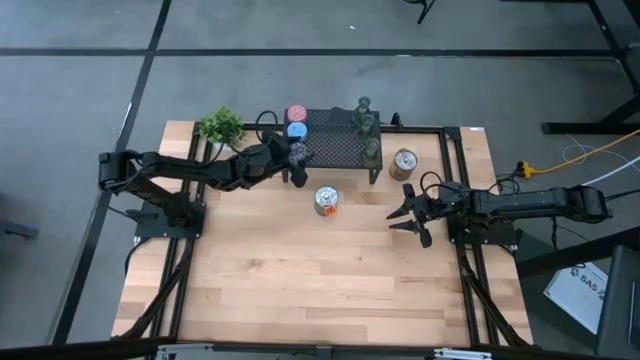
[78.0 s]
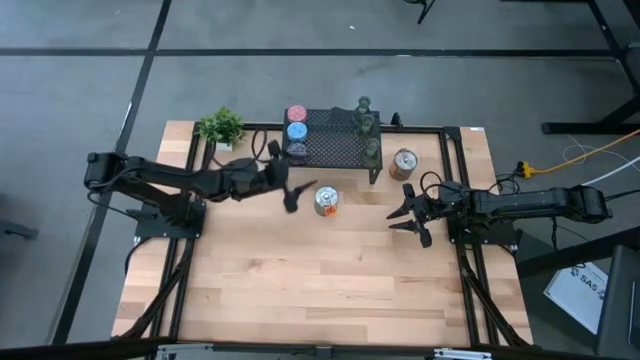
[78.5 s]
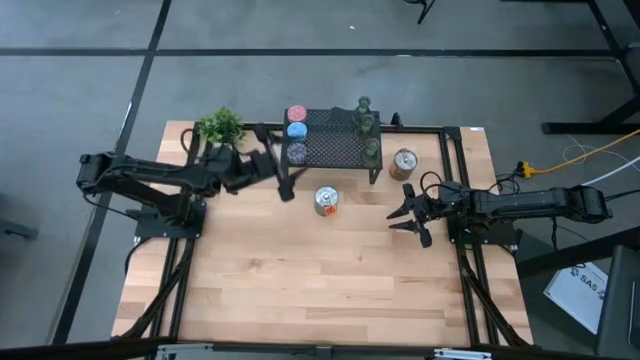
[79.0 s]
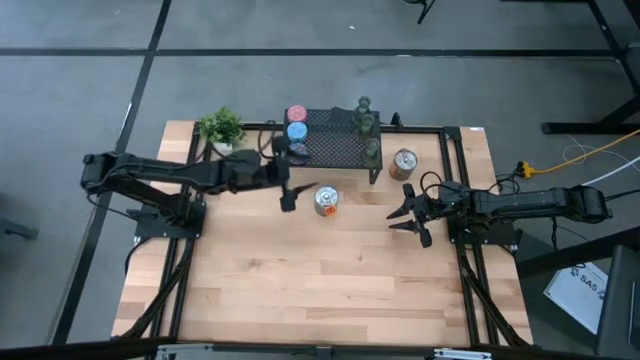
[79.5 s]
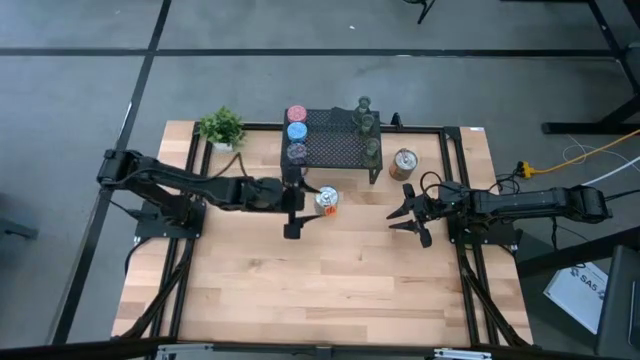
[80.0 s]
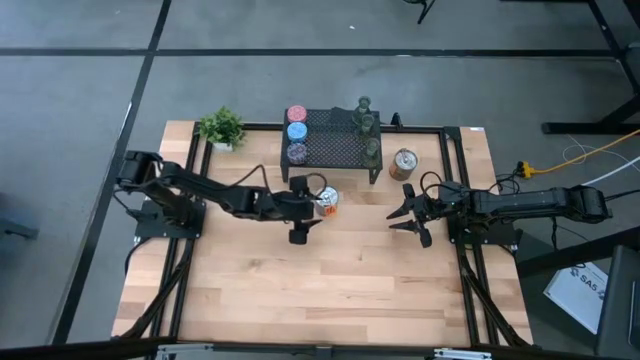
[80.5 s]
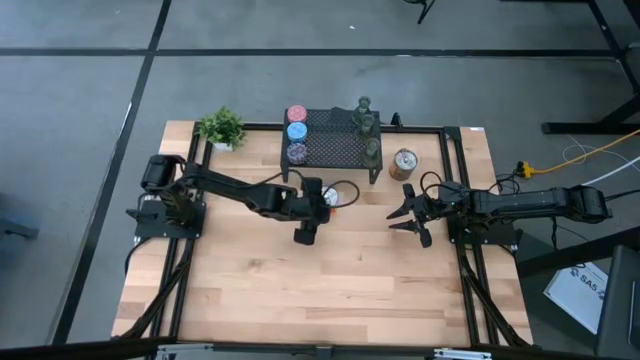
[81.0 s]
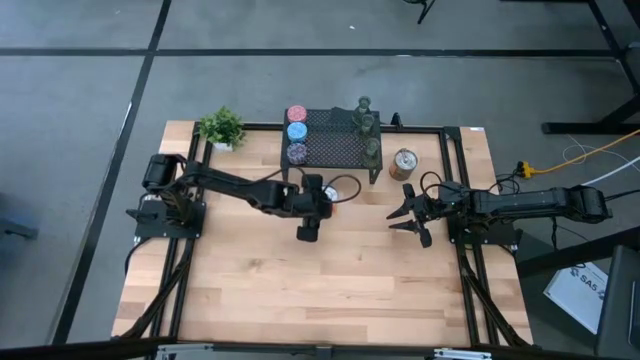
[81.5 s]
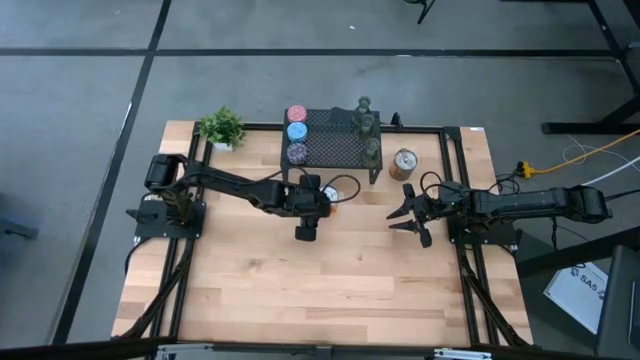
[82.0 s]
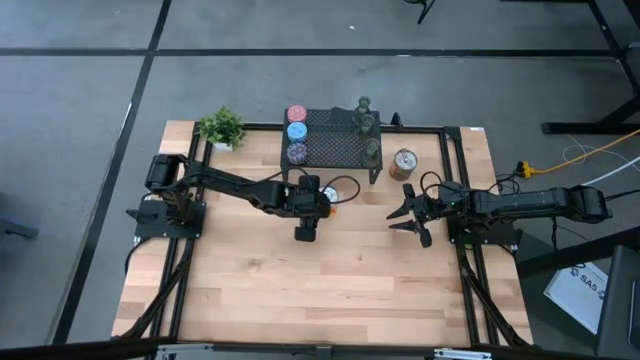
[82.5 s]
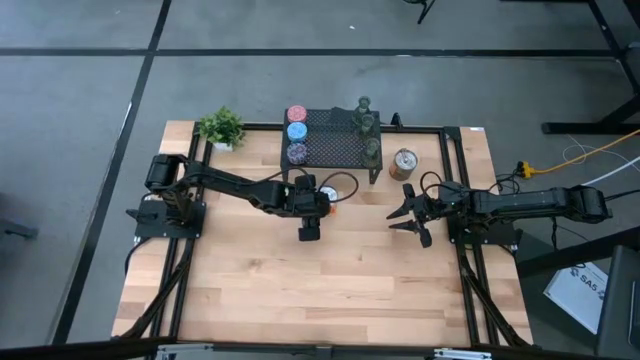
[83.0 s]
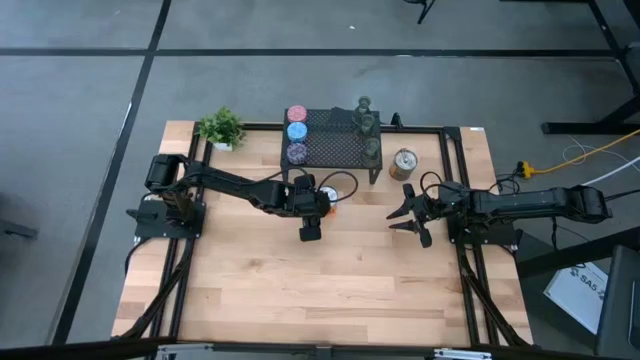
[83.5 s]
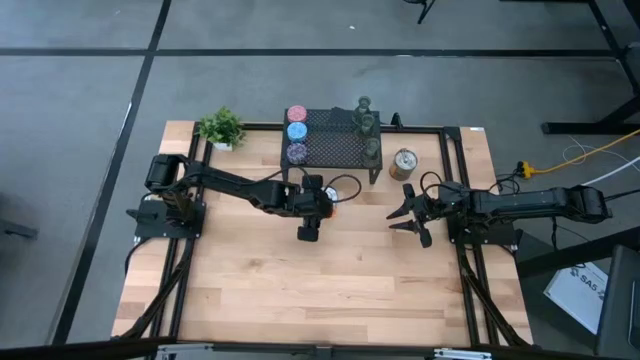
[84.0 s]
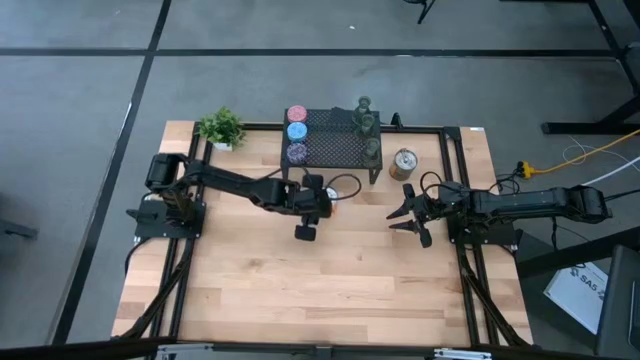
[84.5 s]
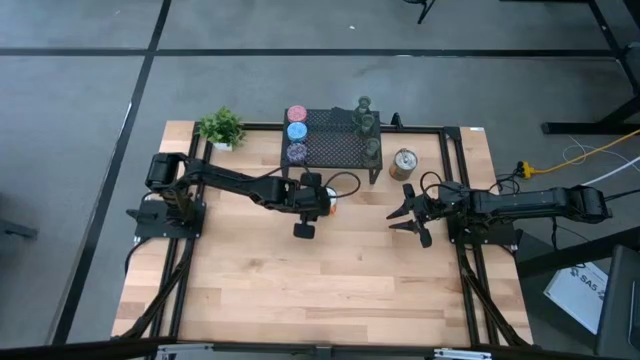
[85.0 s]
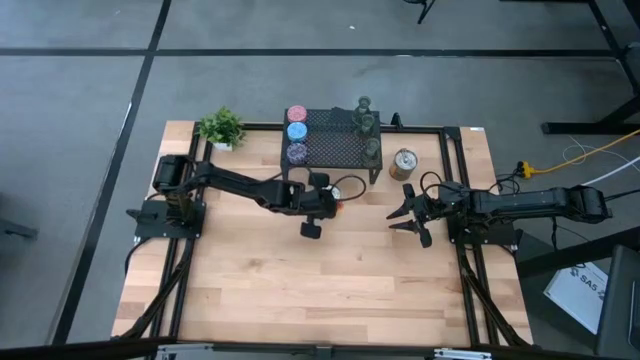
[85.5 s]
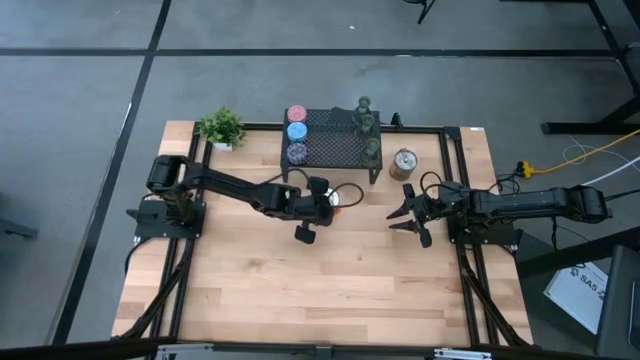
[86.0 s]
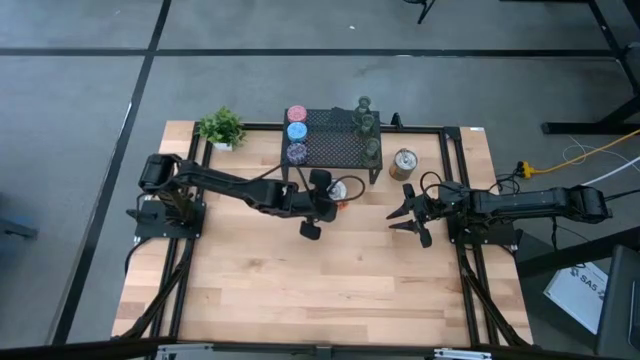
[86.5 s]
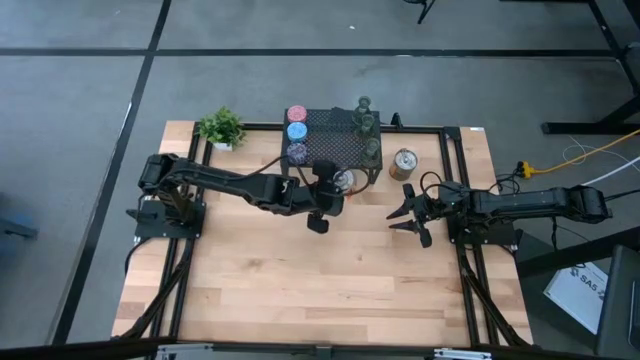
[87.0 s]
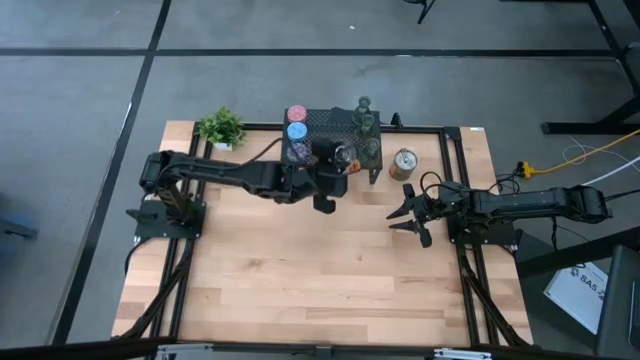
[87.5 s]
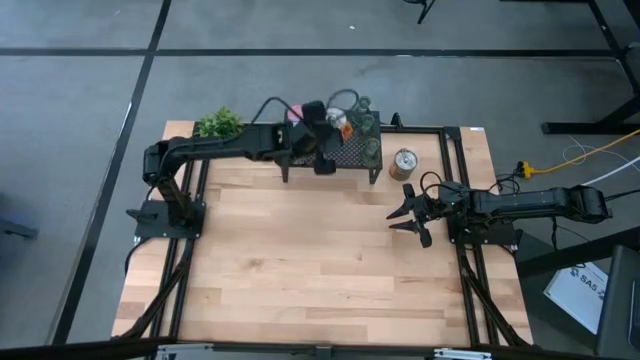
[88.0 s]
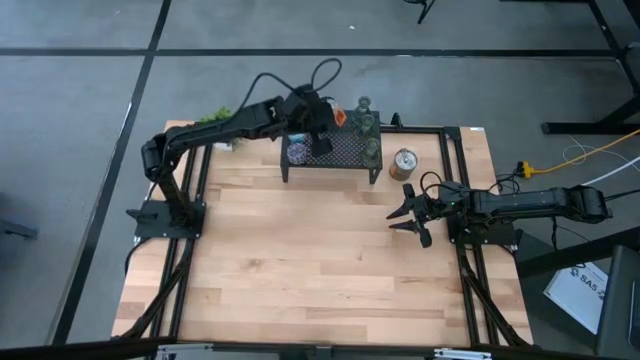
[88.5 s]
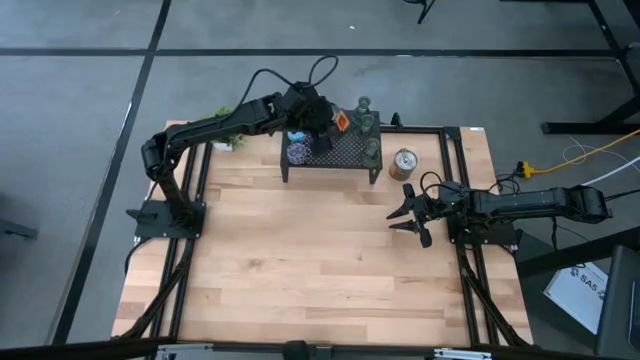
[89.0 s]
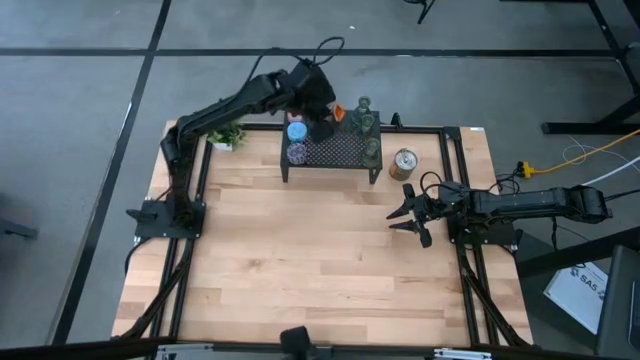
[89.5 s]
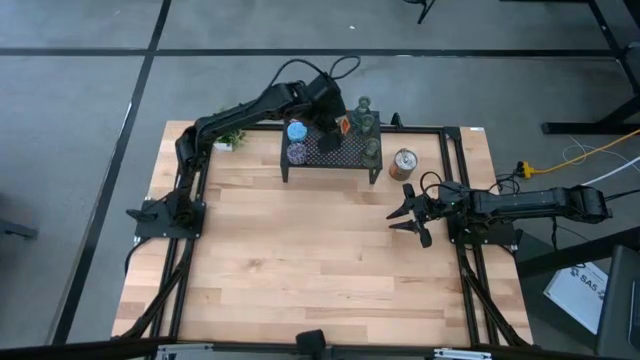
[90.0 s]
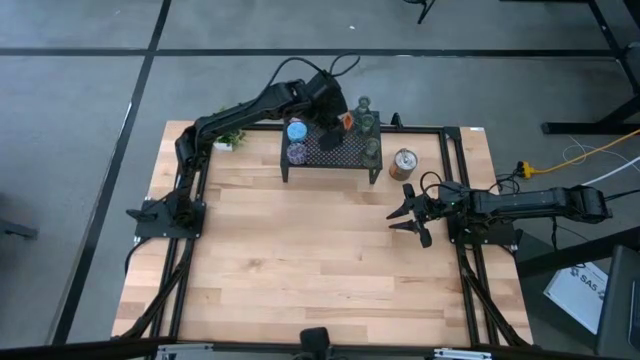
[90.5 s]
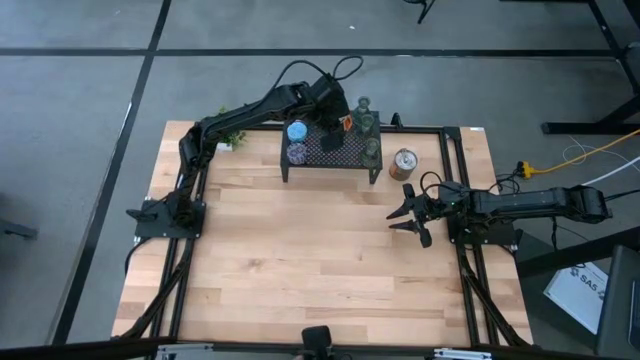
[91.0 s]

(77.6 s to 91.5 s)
Task: Pick & Place candle stick holders
Put the left silver scented candle on the shelf

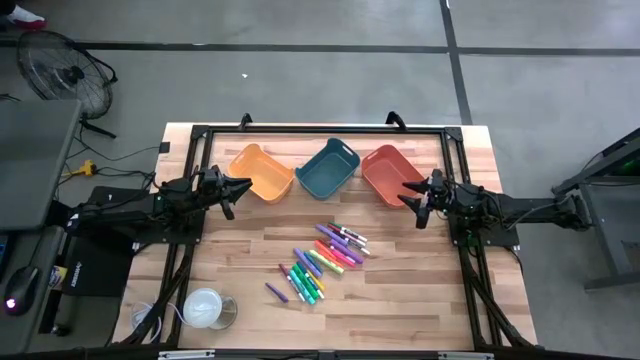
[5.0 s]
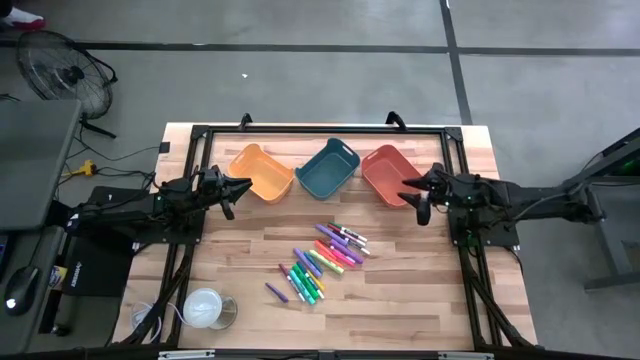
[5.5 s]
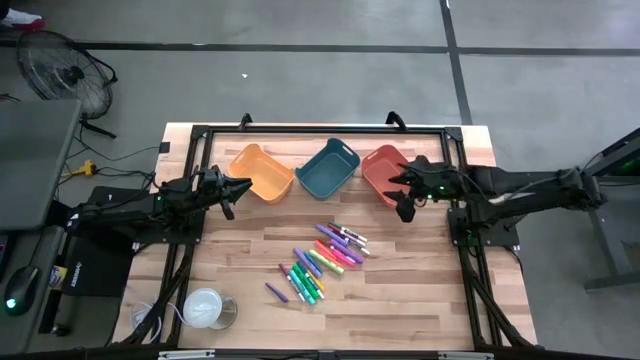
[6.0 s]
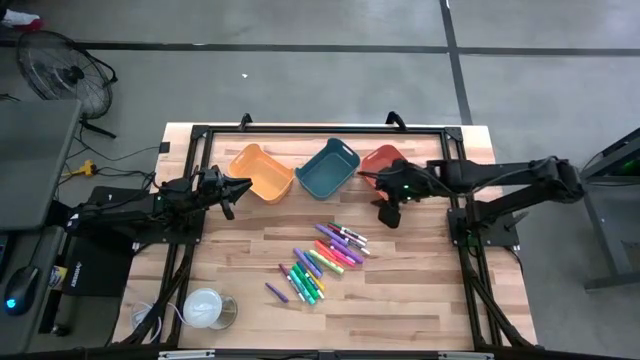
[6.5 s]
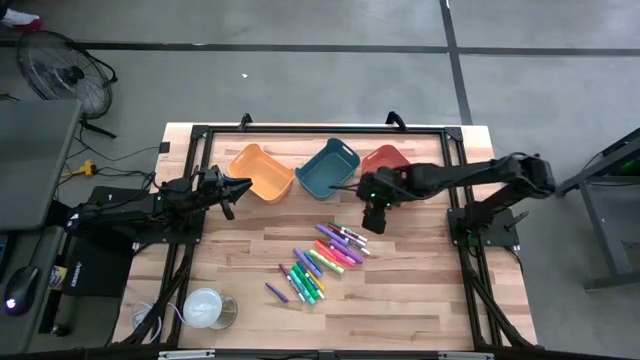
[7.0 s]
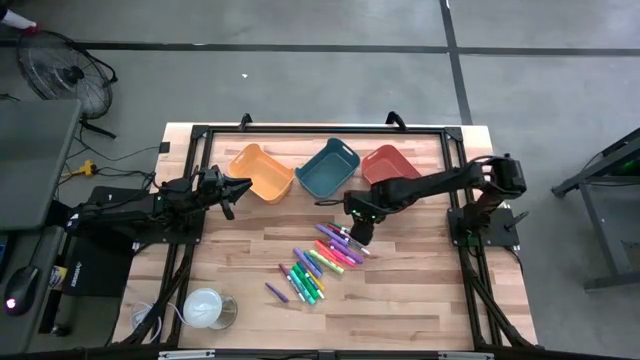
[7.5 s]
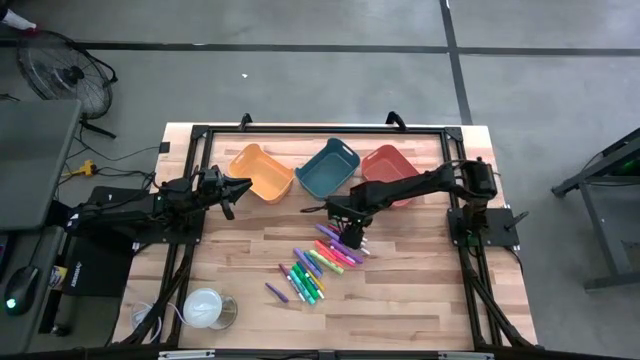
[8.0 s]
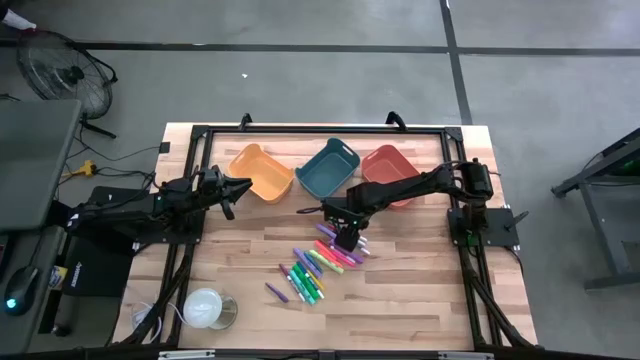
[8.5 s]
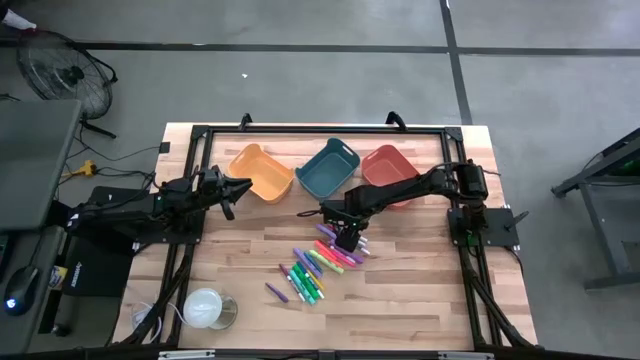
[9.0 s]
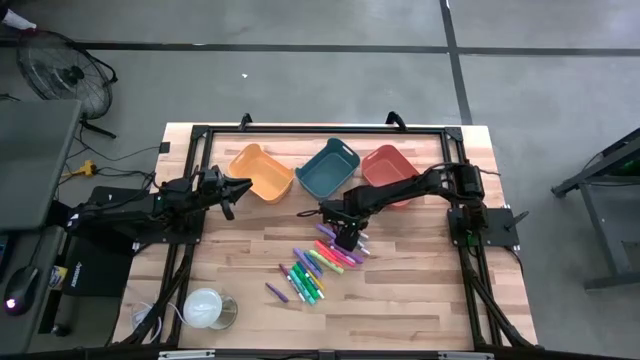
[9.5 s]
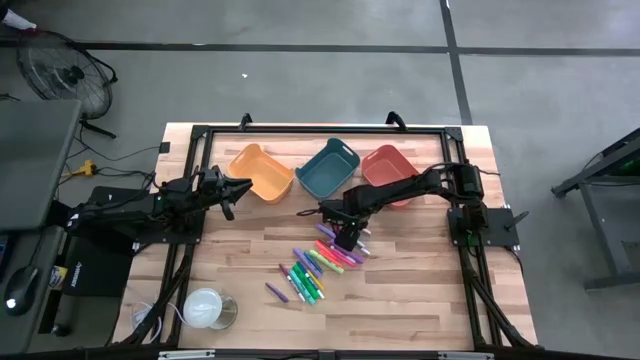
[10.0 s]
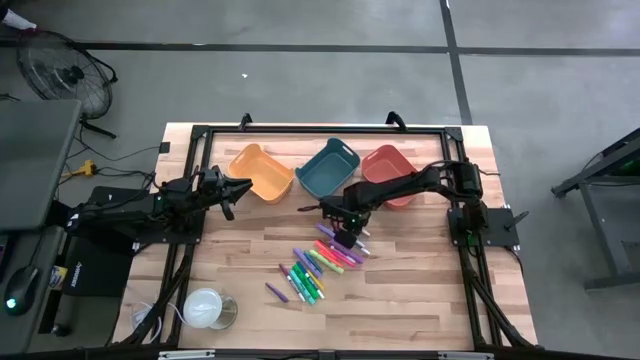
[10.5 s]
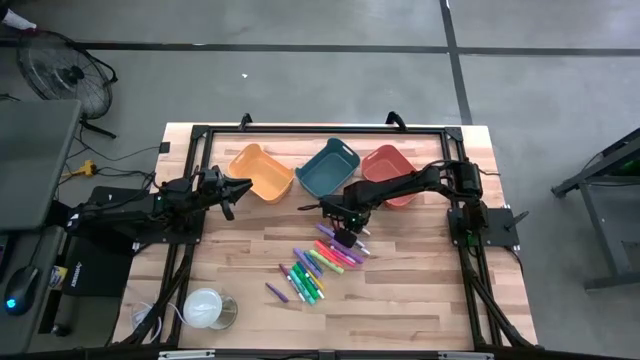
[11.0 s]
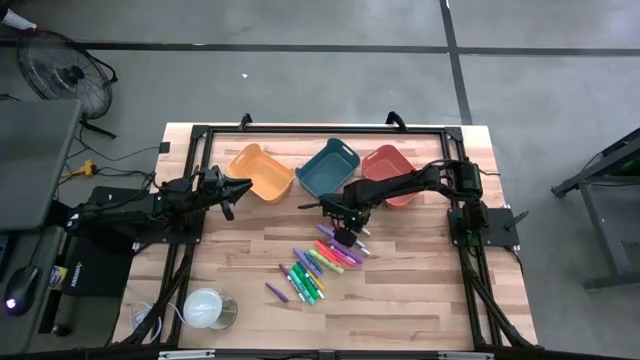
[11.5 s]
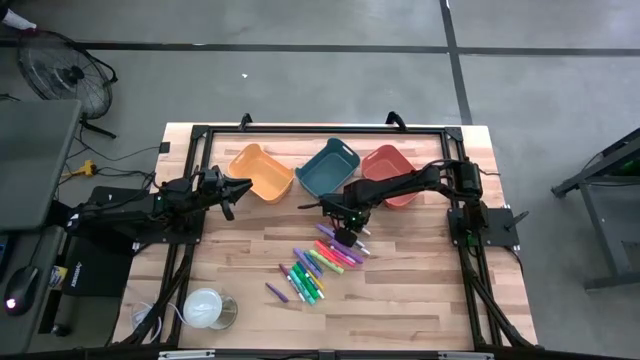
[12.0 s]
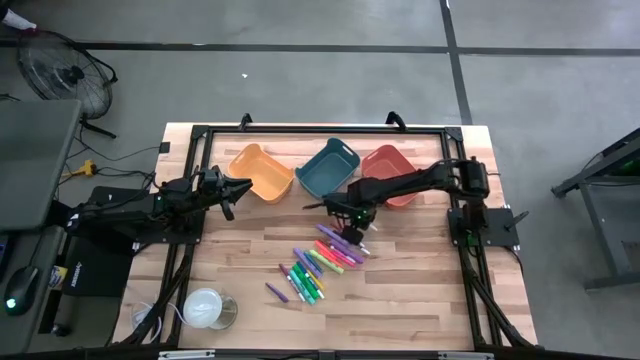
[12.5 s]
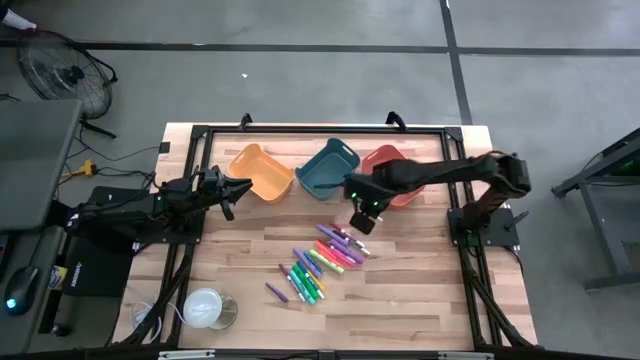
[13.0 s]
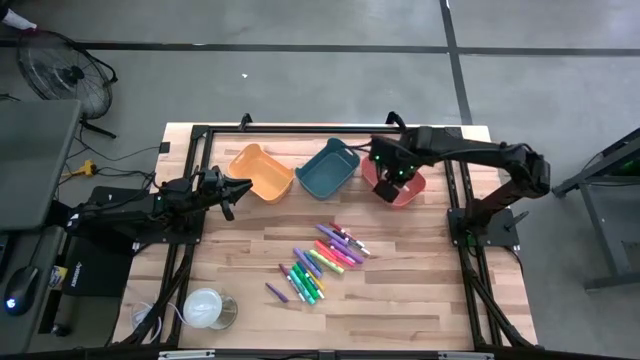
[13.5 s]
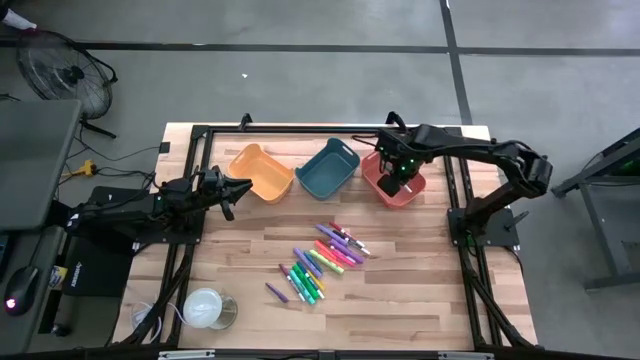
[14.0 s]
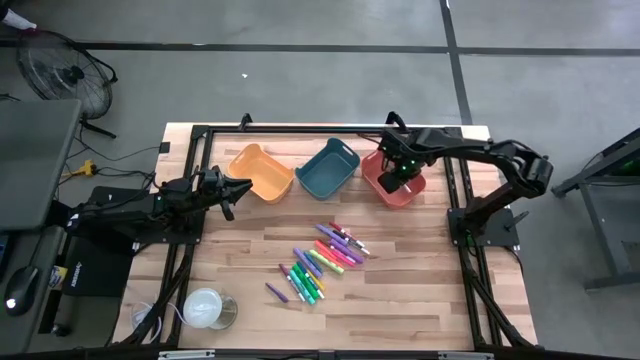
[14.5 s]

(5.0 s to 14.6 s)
Task: Pick & Place Markers
Put the green marker pen into the orange bin
